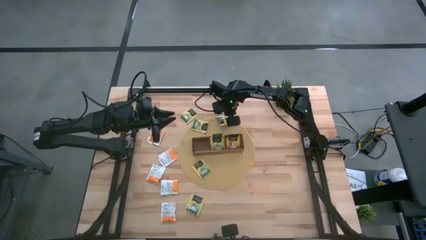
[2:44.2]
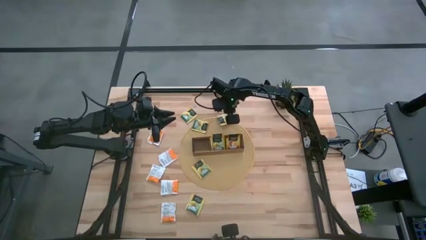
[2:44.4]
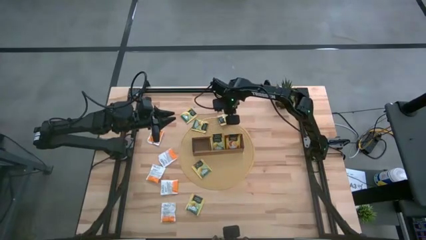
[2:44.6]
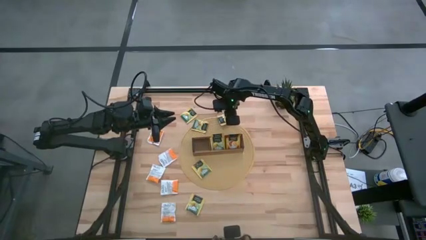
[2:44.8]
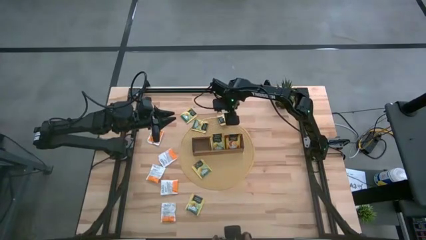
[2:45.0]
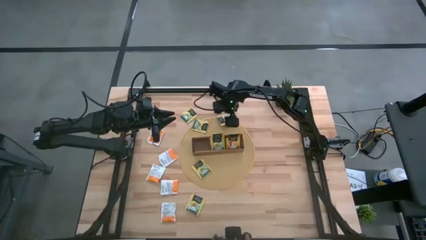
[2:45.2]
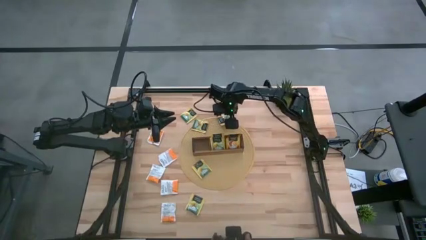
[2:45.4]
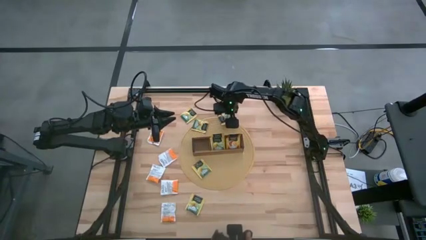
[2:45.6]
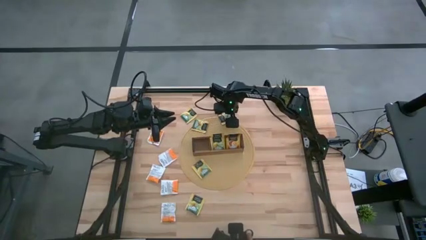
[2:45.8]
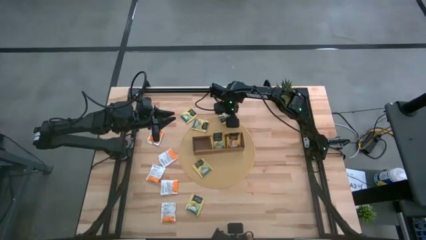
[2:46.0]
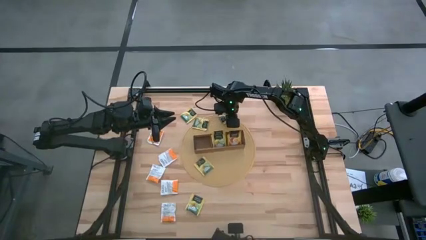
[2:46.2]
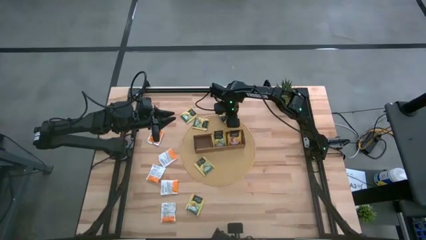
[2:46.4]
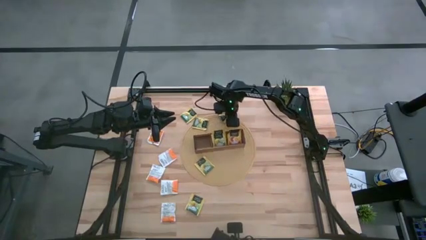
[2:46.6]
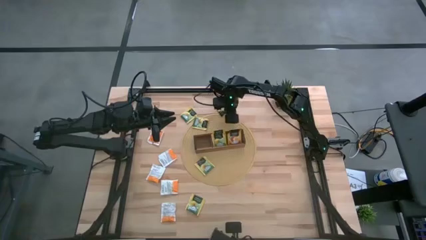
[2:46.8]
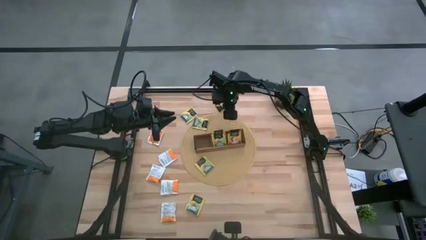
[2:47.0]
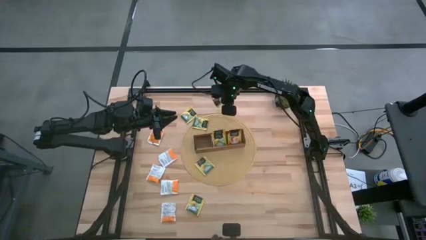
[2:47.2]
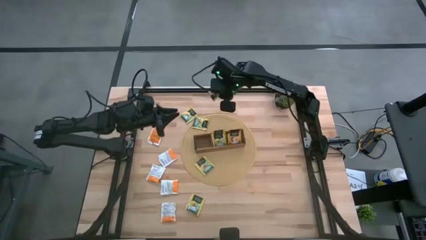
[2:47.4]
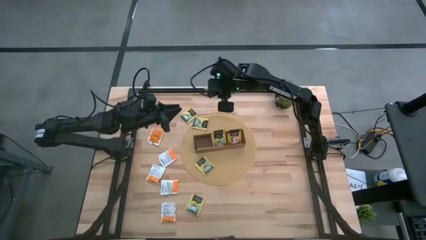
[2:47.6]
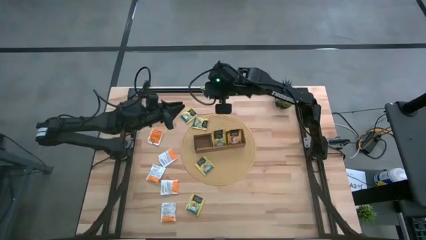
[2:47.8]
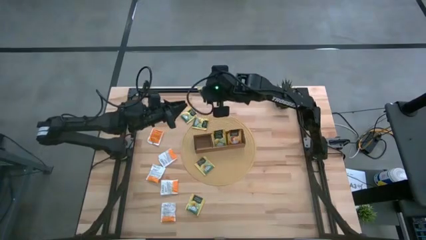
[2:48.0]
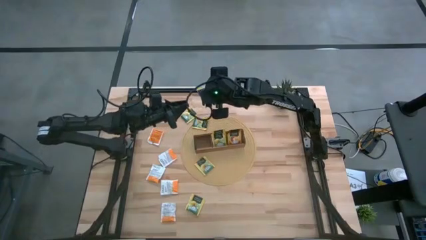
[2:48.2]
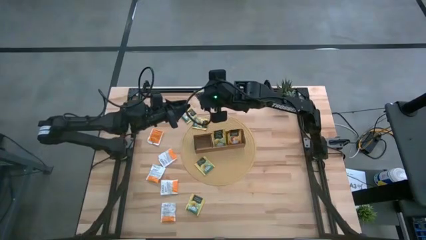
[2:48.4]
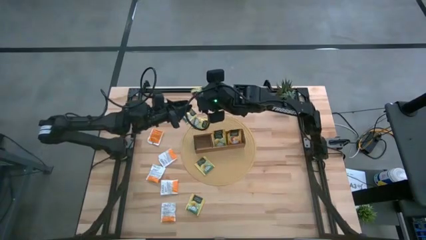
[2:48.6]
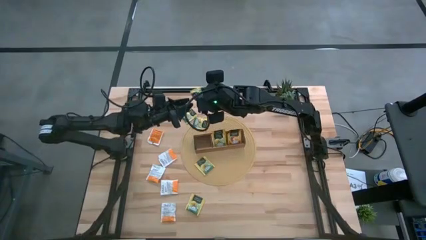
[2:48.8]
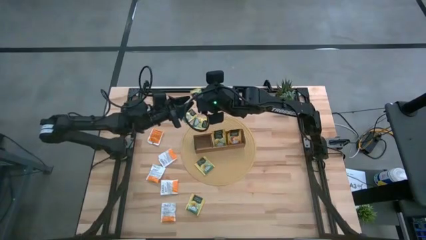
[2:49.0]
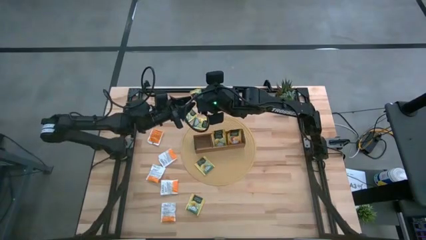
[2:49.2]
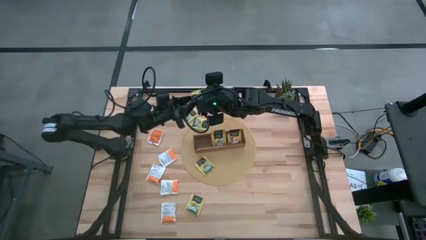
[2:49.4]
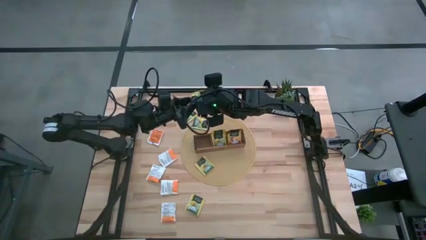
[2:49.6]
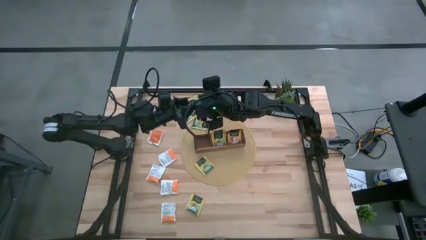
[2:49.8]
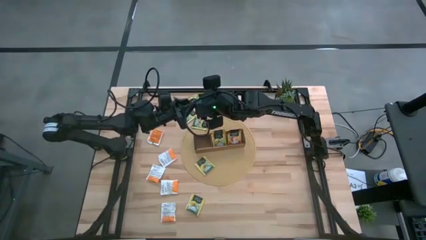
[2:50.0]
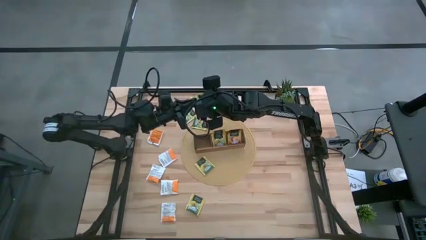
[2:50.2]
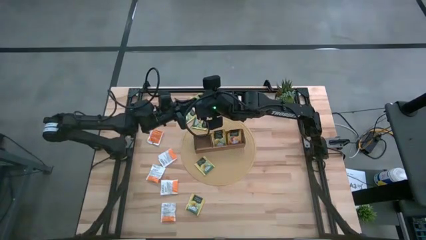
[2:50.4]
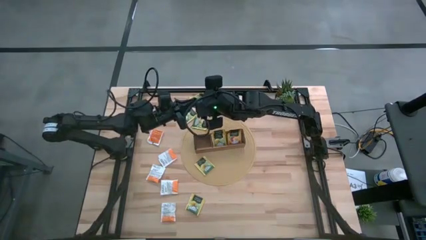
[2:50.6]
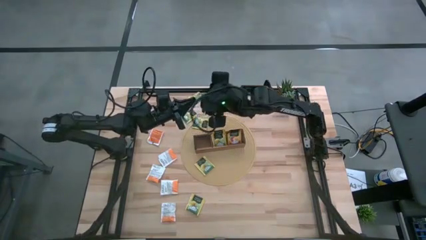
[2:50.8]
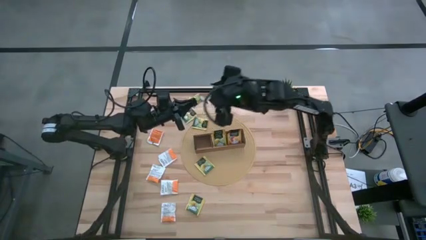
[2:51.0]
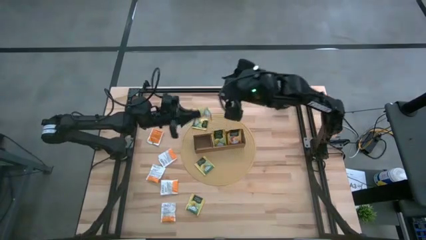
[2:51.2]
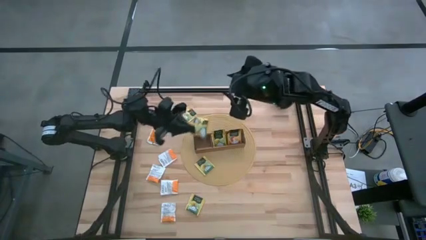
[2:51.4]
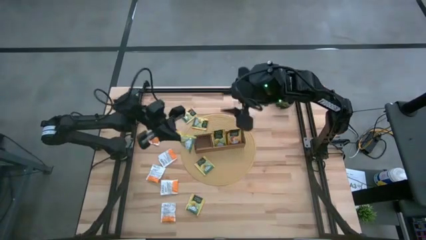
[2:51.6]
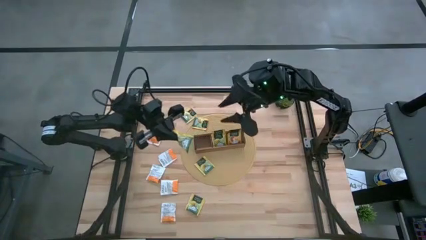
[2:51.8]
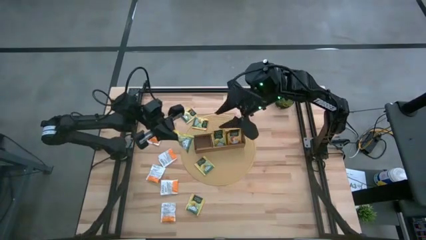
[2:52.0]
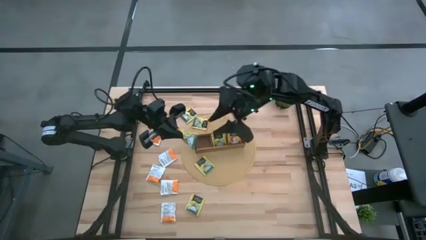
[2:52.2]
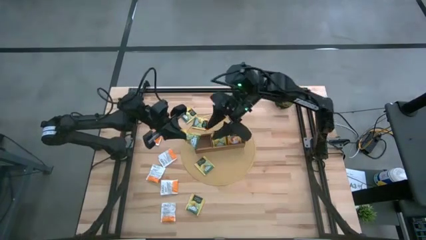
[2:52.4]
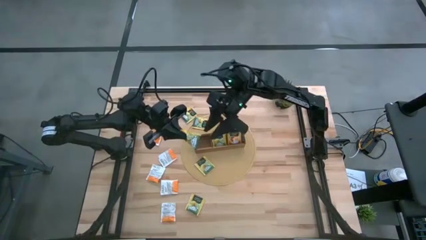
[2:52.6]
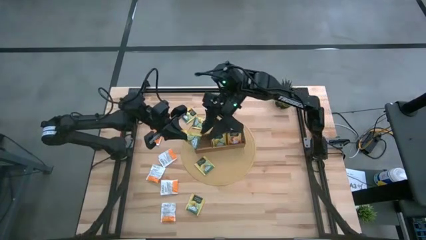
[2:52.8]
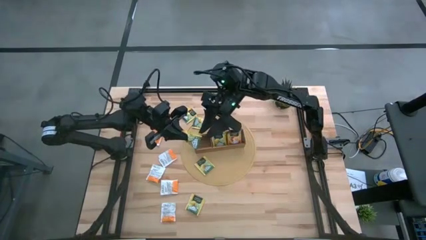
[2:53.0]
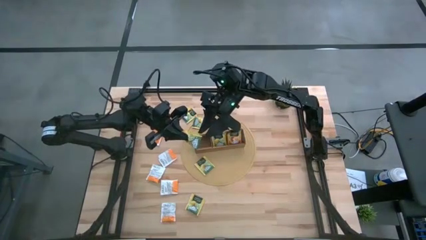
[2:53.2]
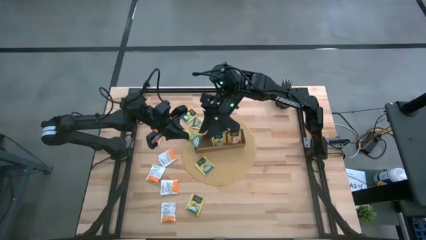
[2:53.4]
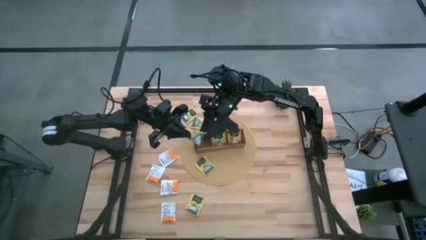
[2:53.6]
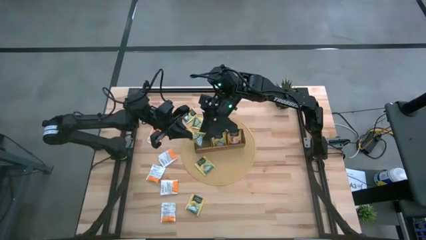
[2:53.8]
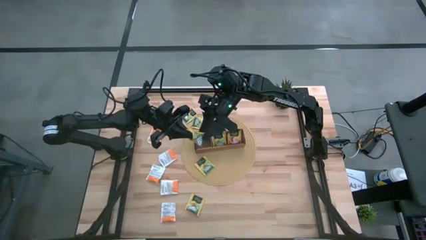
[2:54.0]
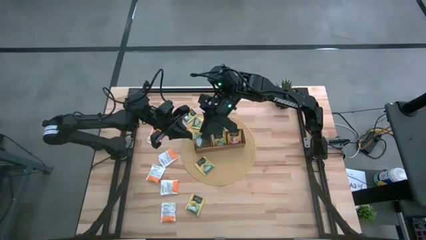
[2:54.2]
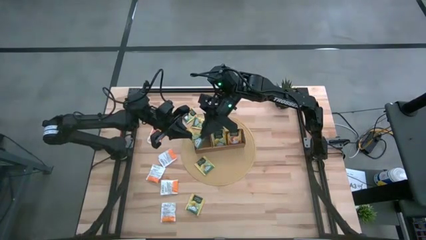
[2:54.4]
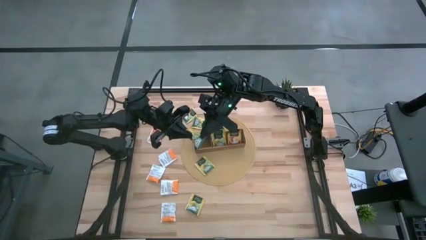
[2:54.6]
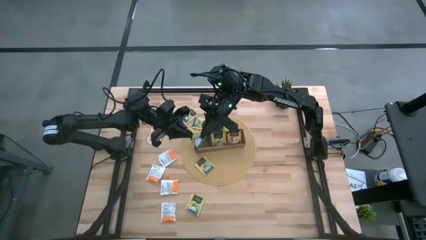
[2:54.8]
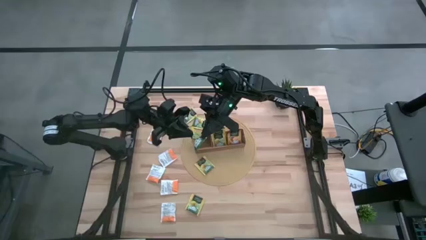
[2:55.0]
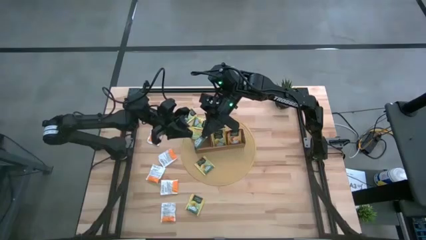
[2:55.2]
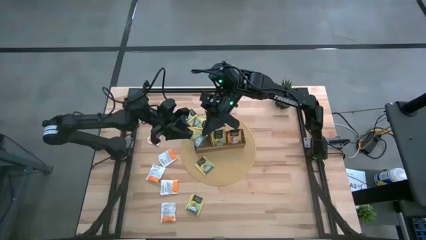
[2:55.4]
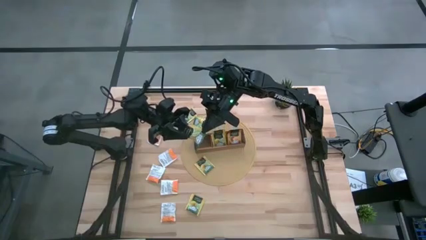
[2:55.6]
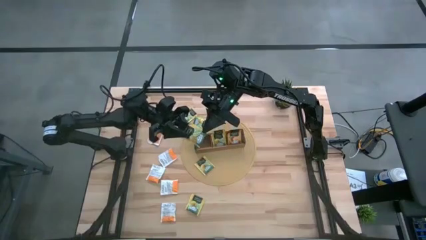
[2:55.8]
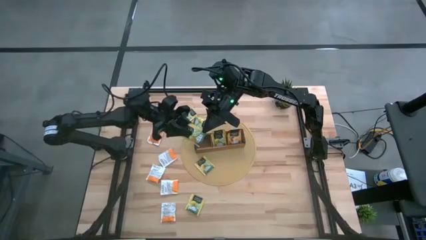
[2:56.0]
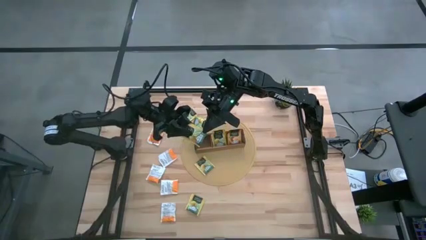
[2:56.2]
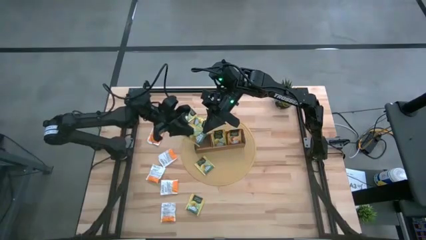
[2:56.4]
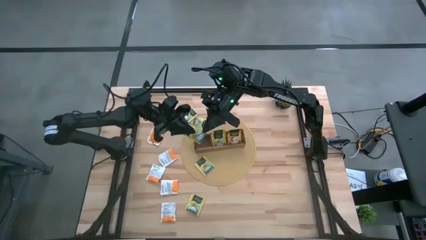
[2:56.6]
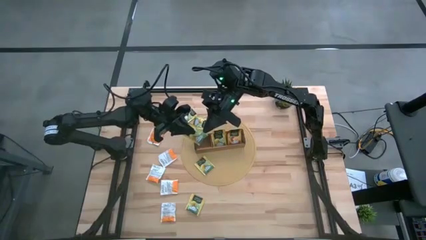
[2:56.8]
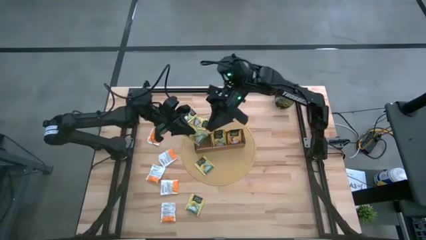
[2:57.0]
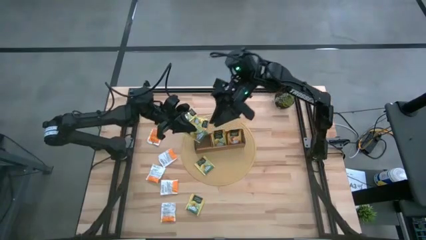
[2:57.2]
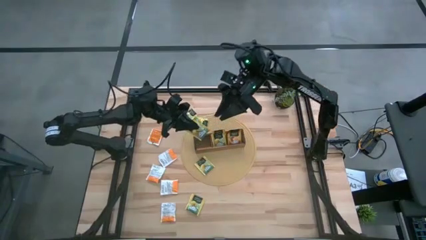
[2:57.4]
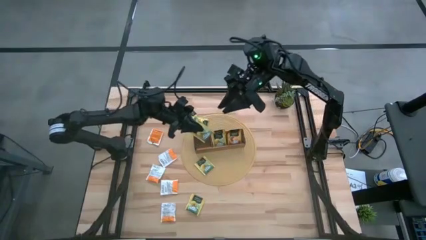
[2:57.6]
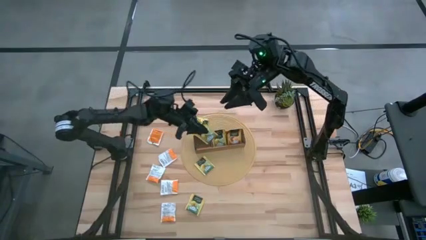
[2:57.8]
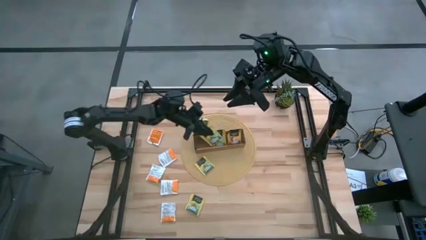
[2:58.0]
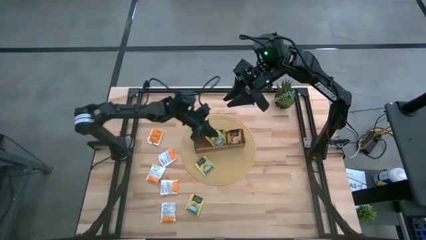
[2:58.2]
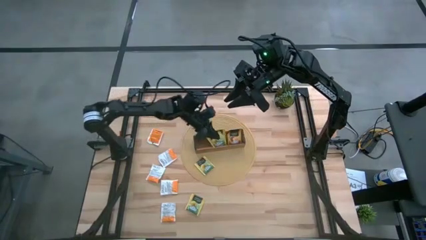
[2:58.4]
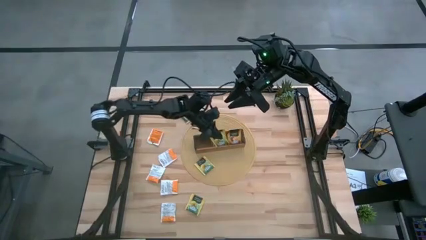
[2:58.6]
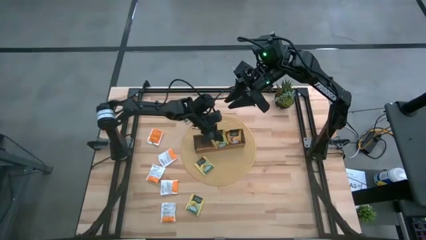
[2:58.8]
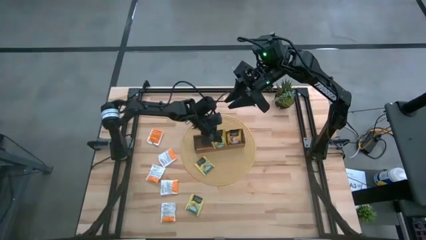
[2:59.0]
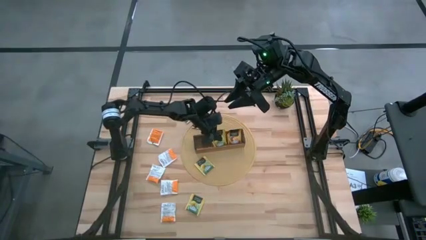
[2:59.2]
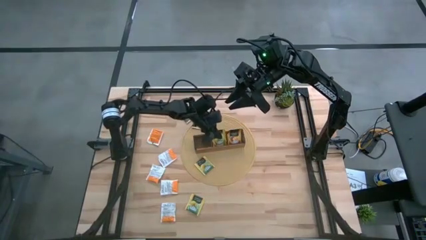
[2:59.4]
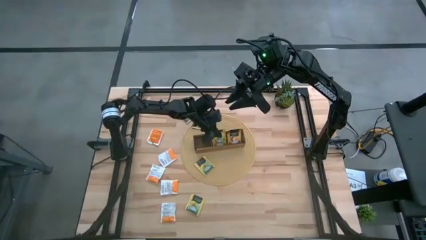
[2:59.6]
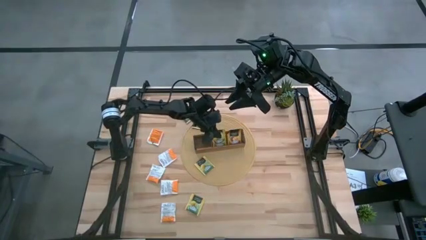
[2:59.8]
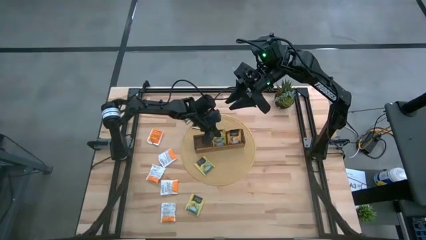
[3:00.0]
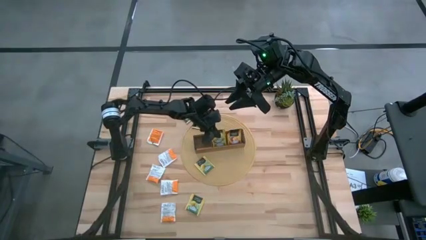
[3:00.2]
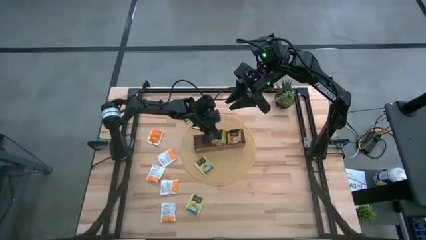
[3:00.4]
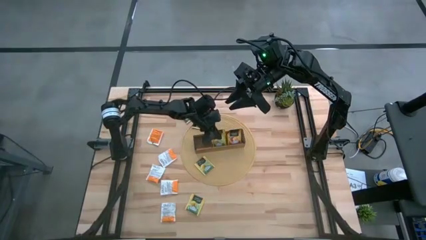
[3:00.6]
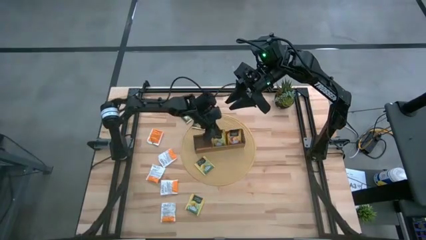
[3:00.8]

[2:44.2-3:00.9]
Task: Pick & Place Tea
Put the yellow tea bag into the middle section of the wooden organizer
